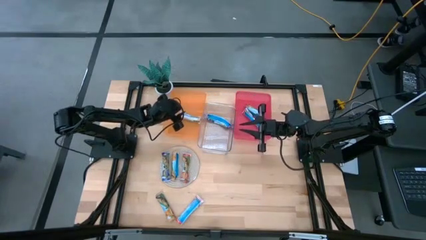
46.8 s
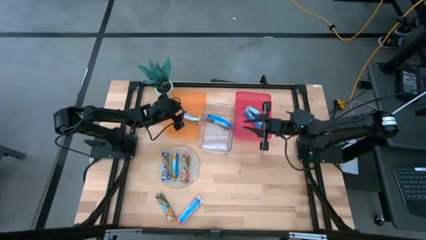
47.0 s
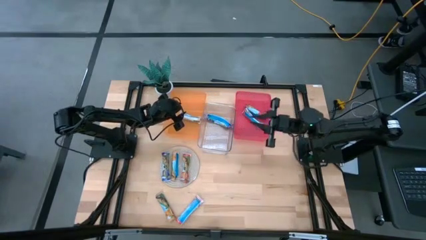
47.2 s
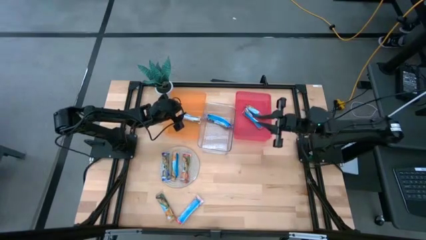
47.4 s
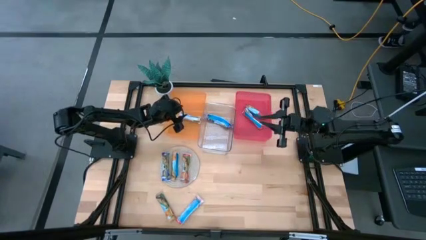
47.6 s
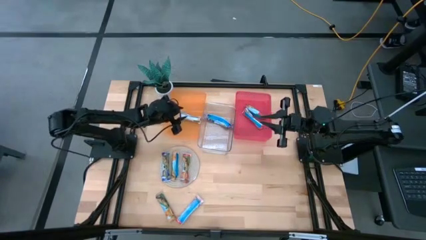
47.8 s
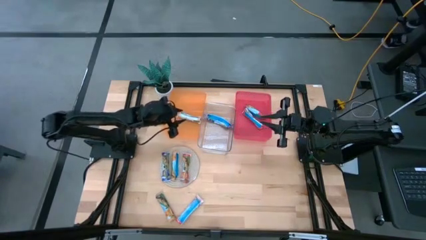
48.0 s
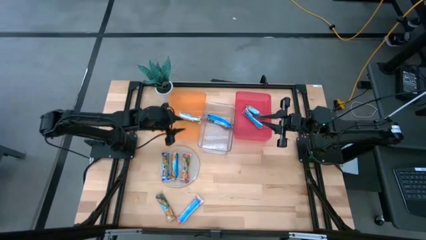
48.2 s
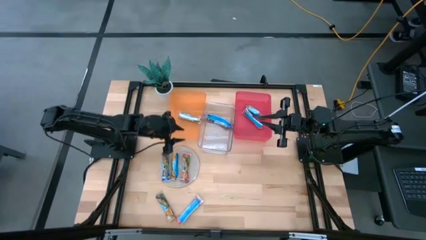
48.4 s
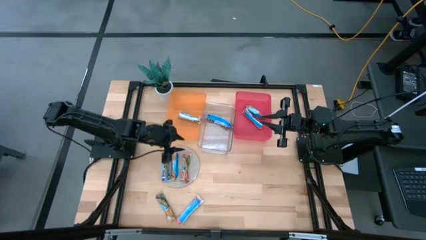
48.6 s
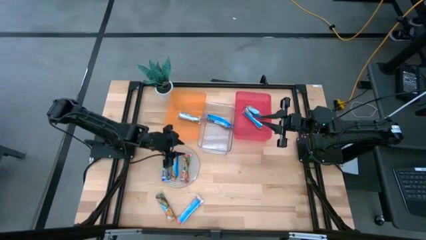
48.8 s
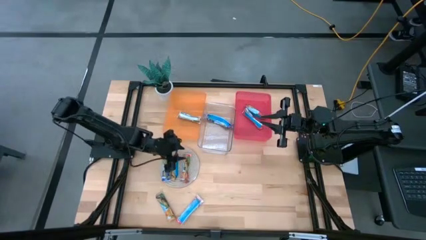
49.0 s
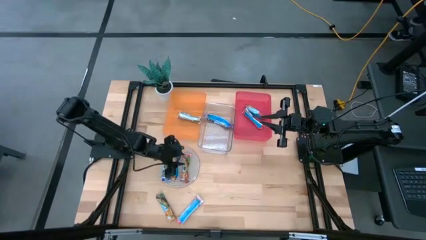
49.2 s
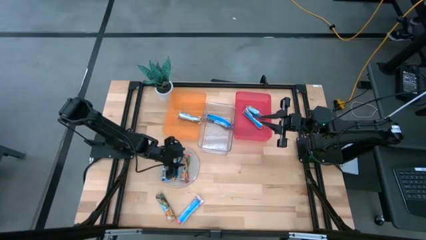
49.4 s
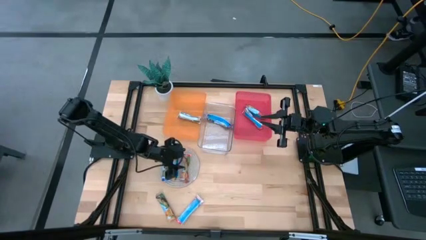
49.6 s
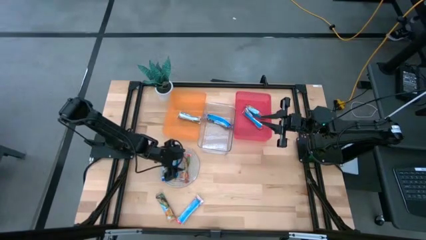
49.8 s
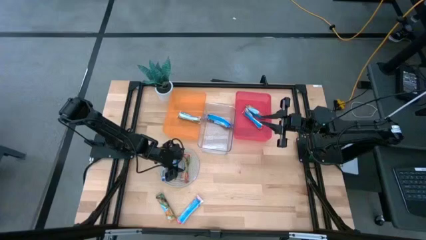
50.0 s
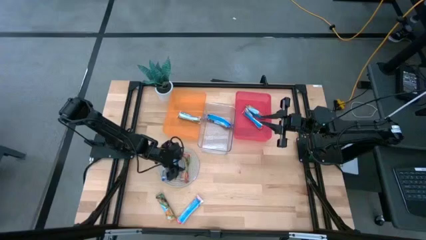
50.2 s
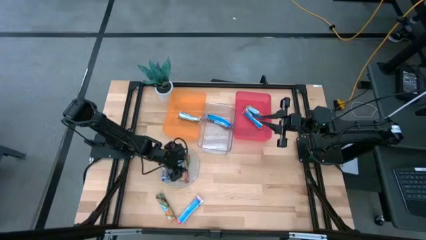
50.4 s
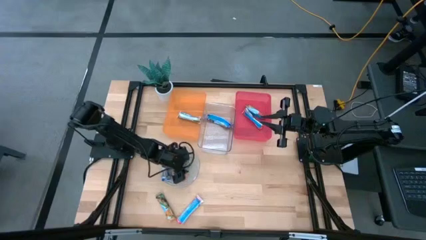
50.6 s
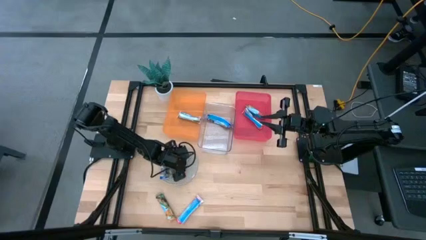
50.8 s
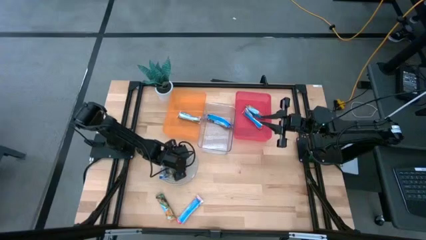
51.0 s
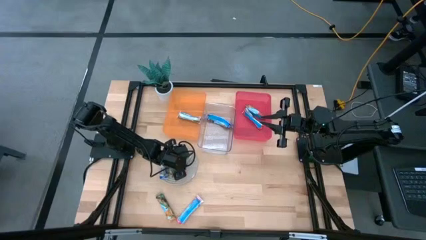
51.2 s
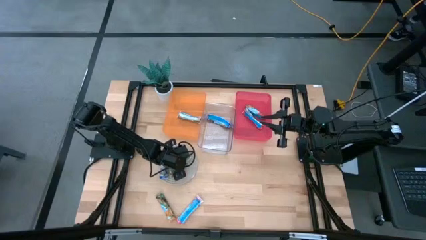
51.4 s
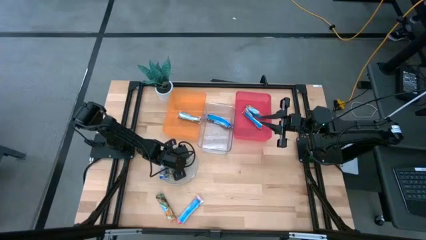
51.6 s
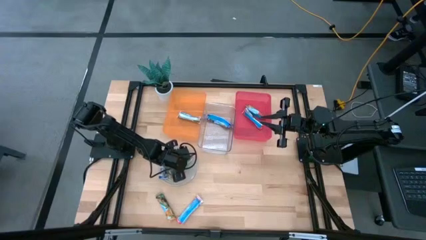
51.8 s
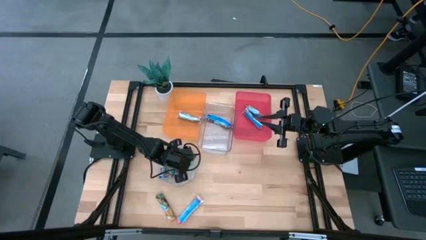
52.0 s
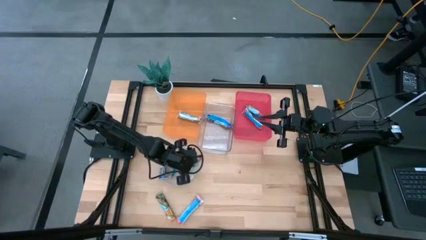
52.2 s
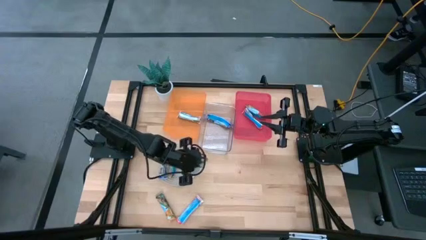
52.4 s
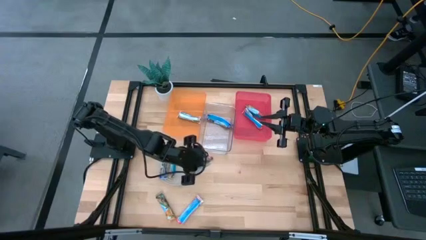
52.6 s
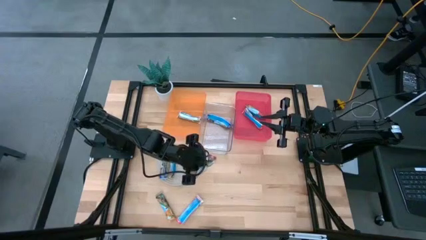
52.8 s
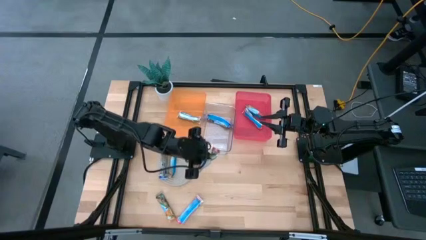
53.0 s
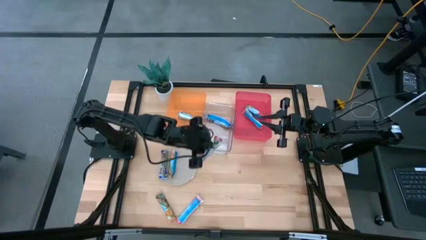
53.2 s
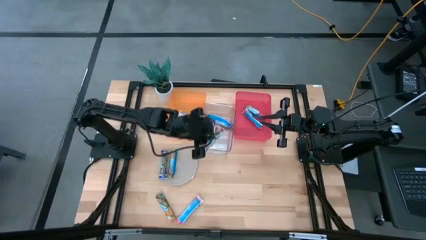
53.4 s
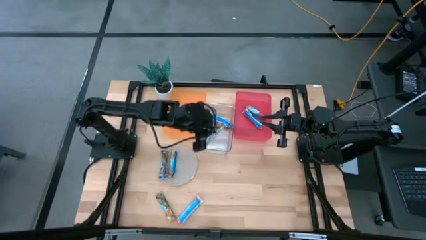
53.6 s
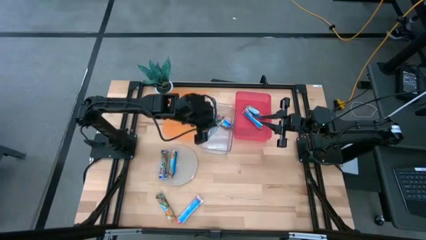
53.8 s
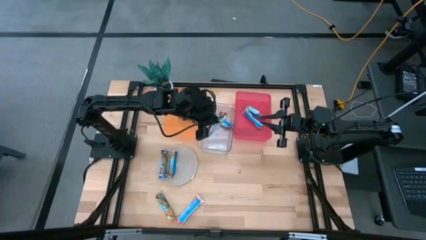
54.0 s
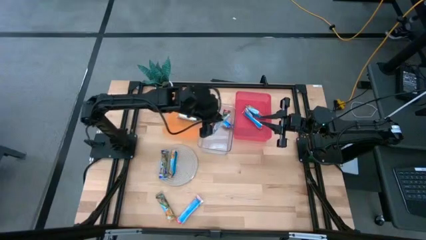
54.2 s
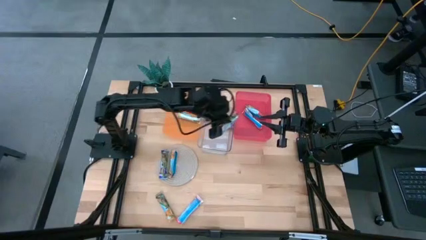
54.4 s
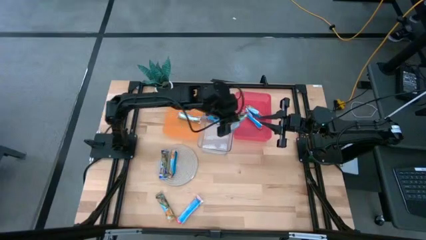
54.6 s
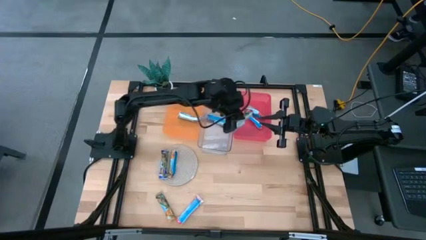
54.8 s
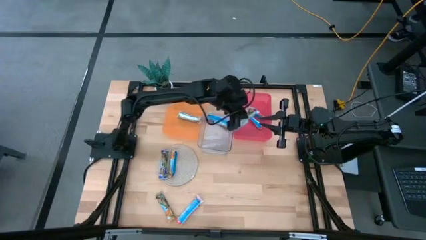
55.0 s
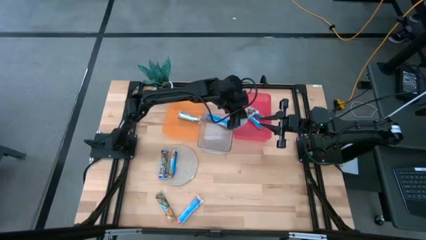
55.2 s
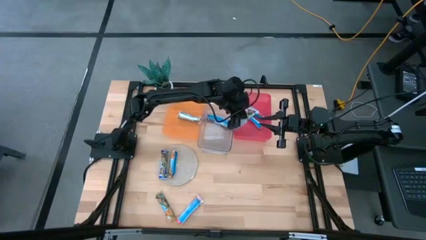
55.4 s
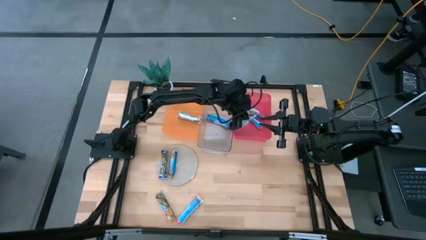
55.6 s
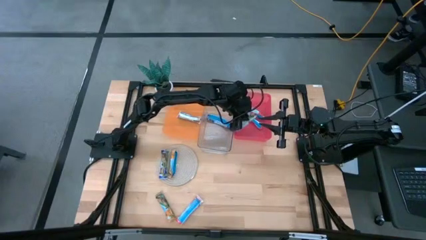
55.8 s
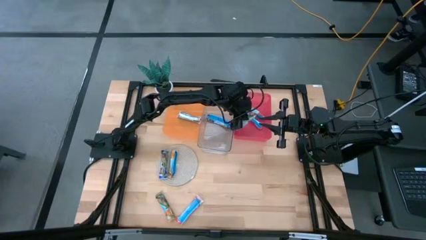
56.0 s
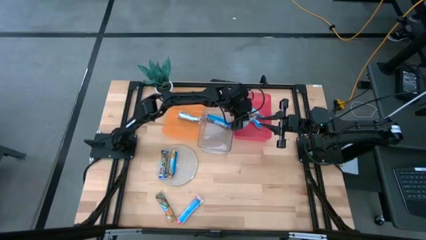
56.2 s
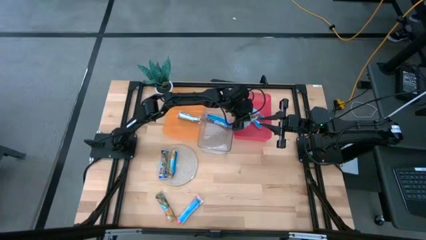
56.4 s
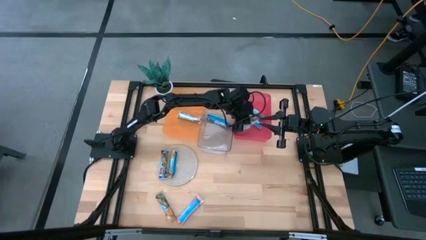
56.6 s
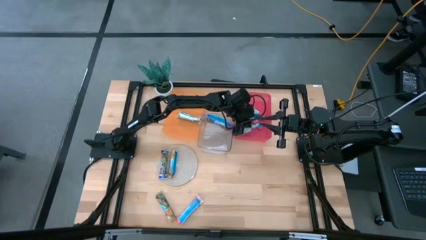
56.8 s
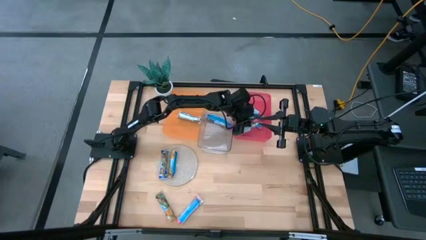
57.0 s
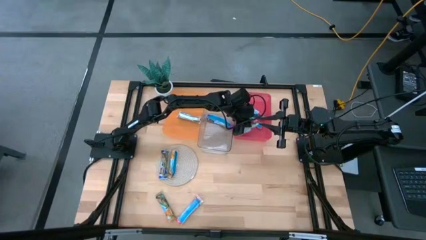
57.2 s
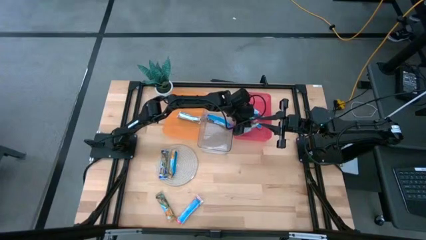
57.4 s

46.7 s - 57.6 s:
Task: Pick and place Granola Bars by type
Put the top red granola bar into the red bin
